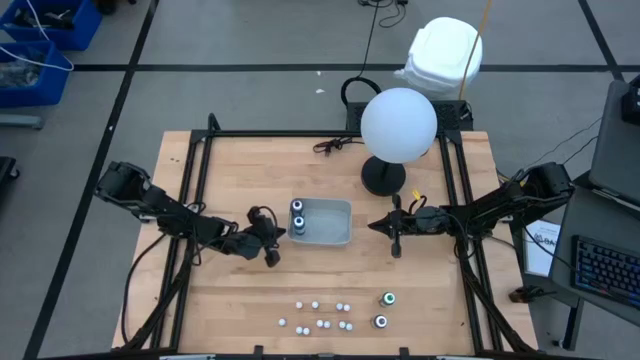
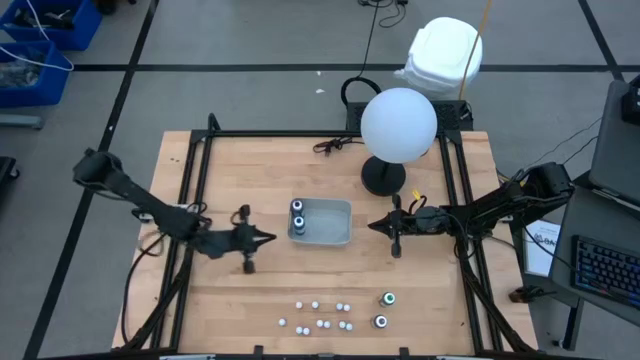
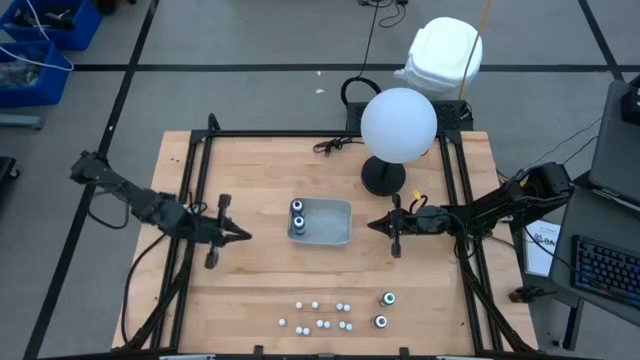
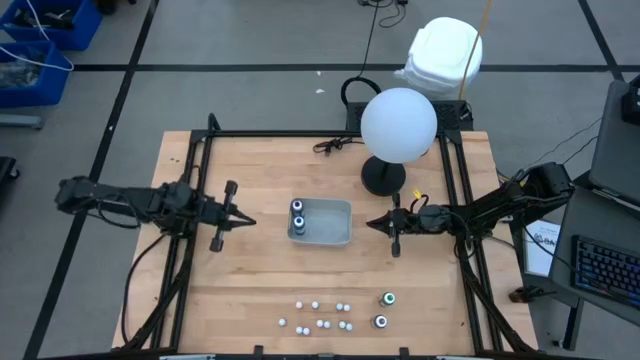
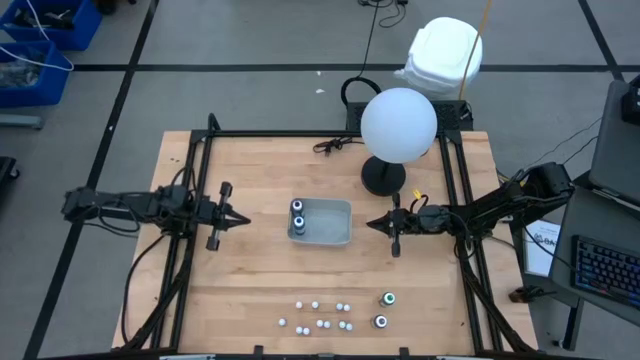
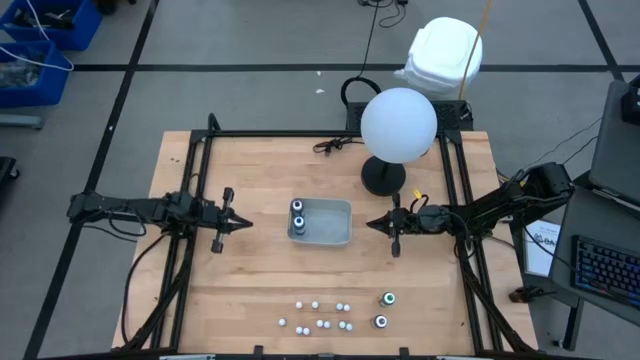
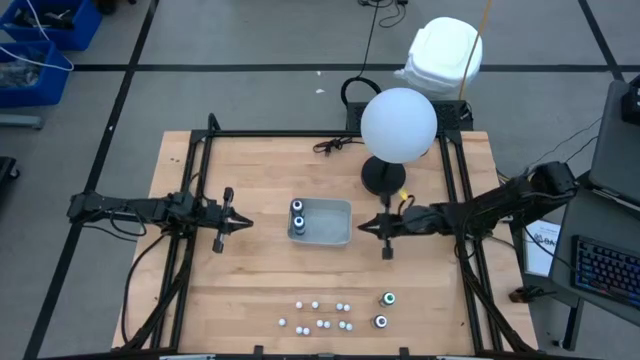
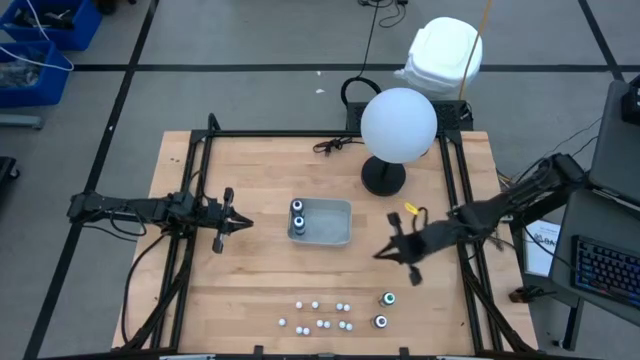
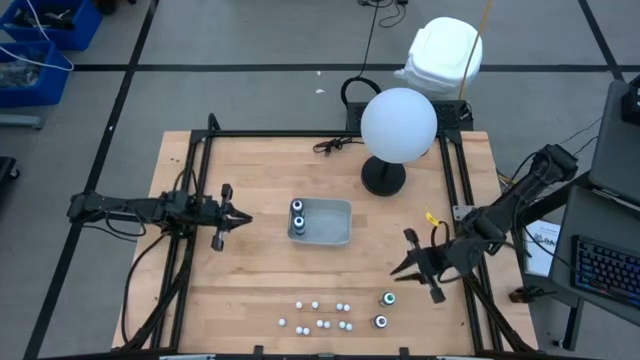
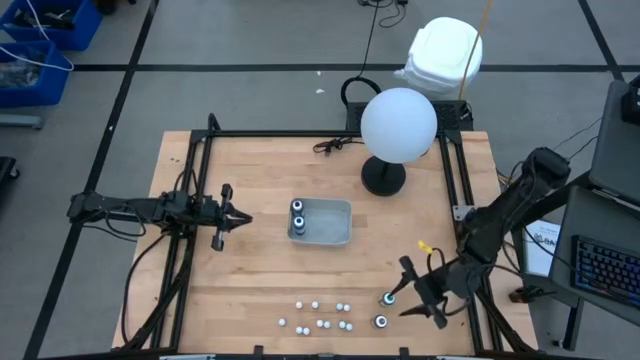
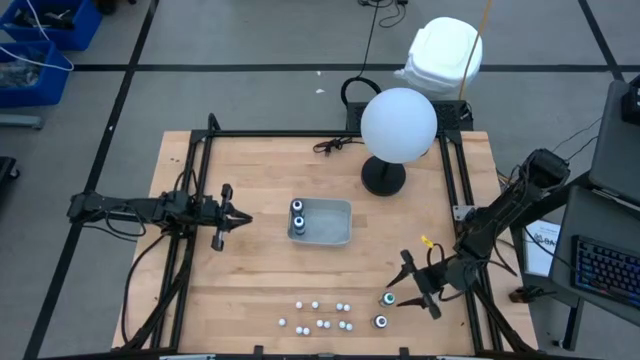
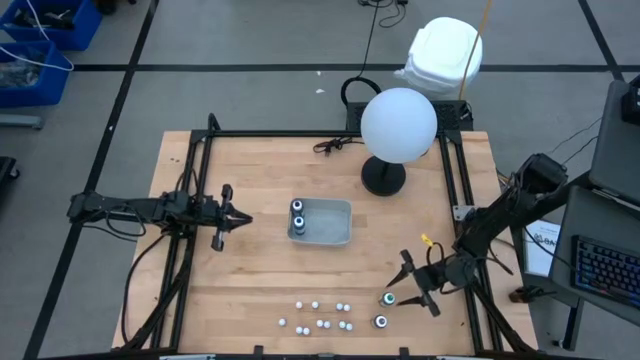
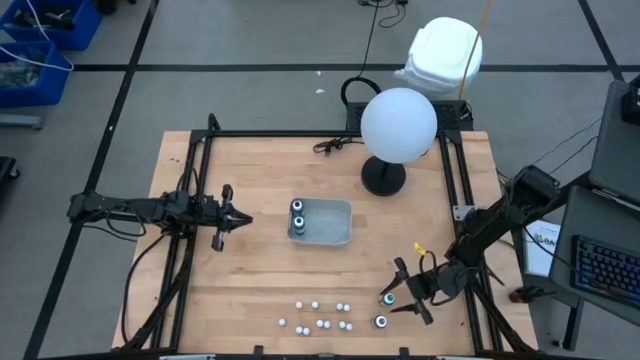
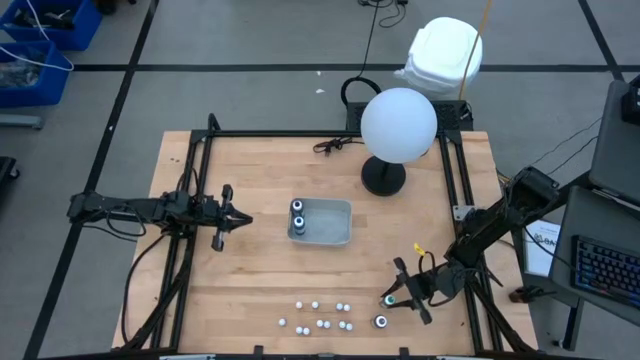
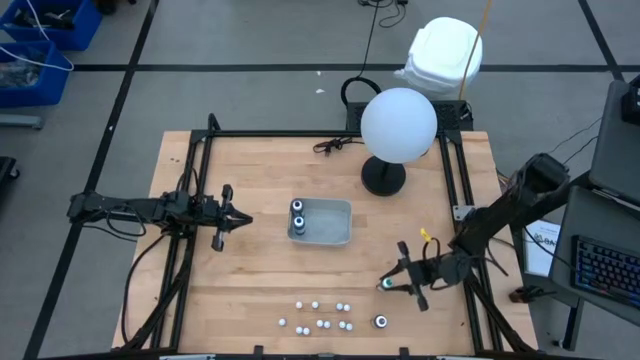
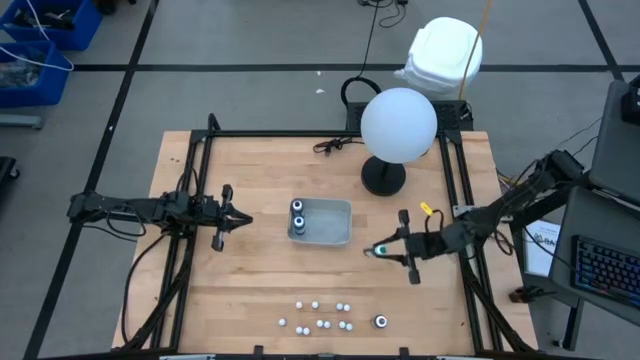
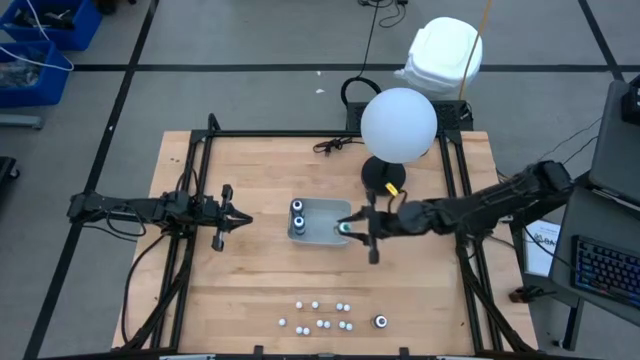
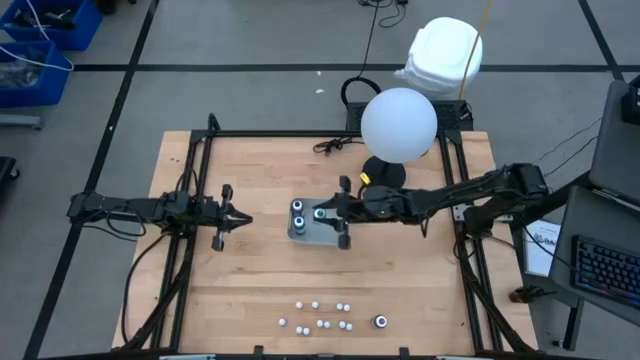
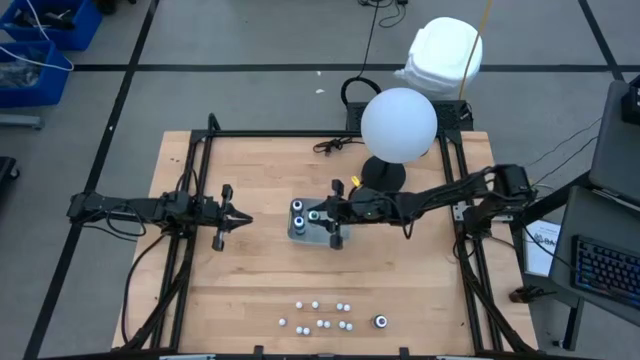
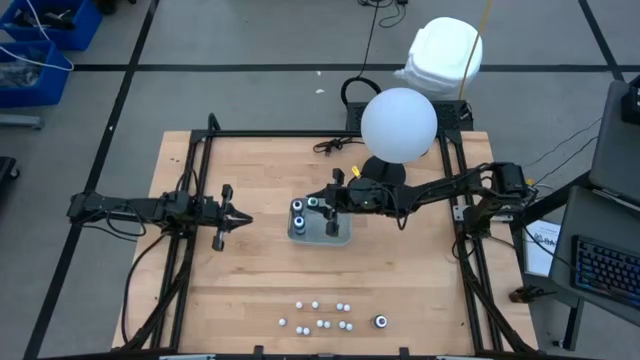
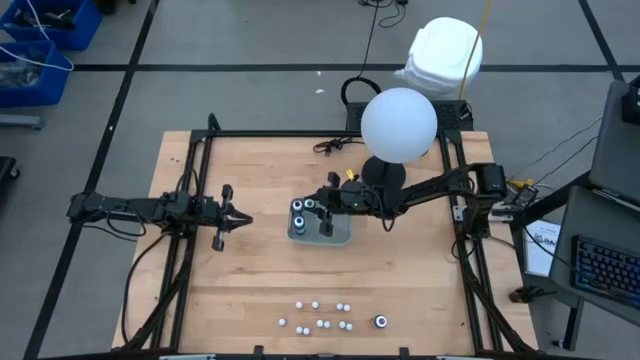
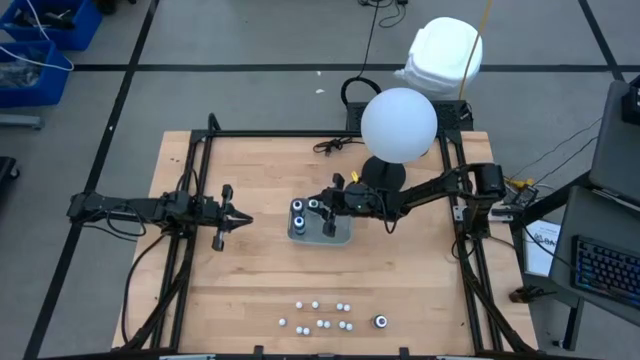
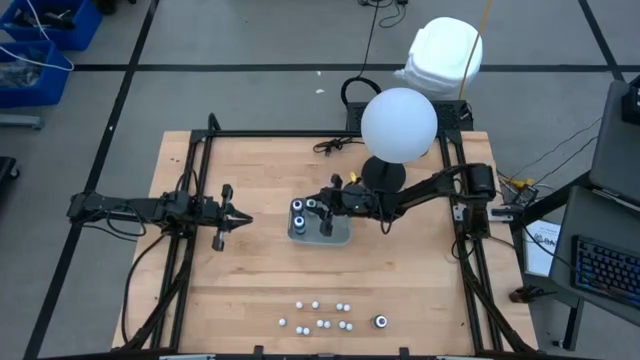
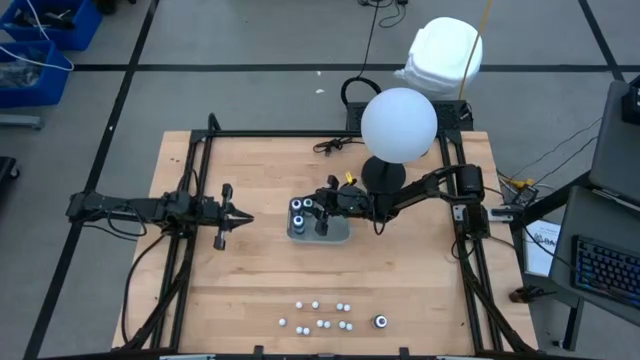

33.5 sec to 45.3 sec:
Task: Pick & Place food coloring
Put the big green food coloring bottle into the gray bin

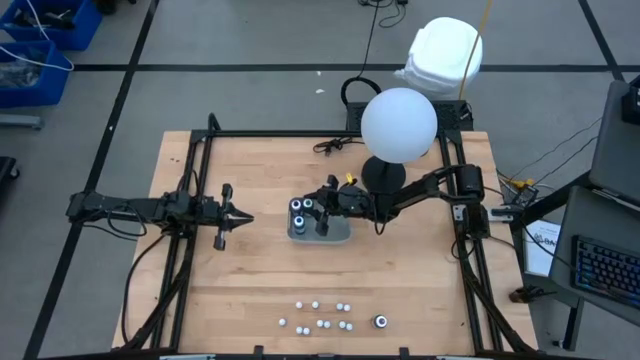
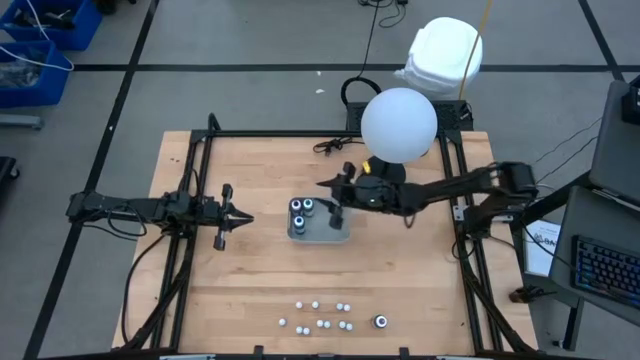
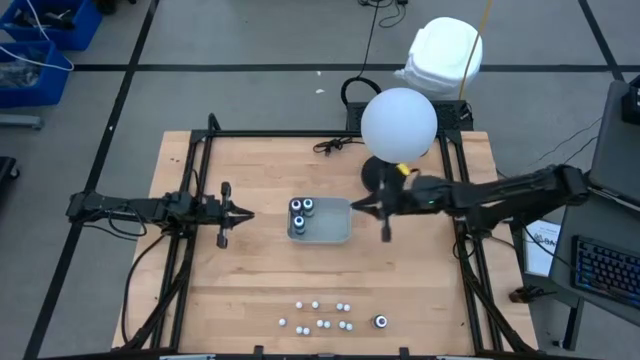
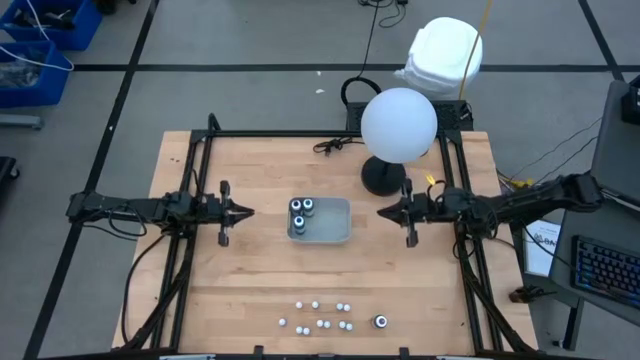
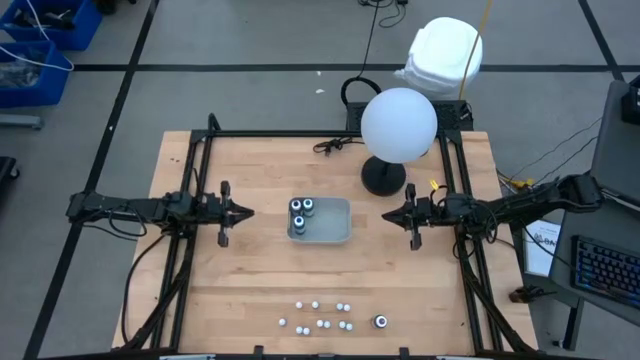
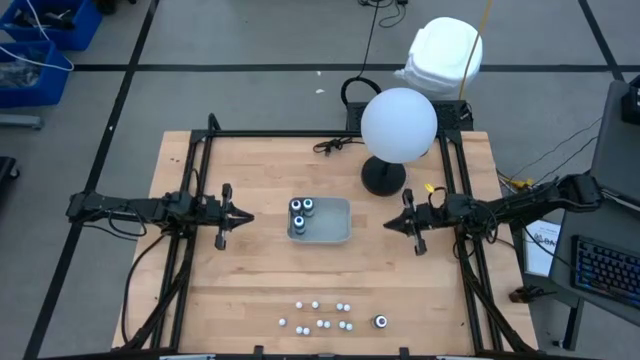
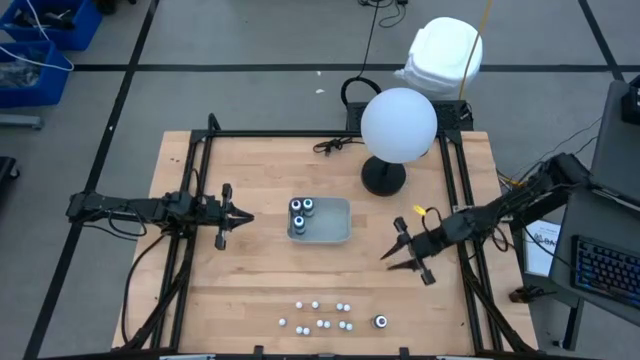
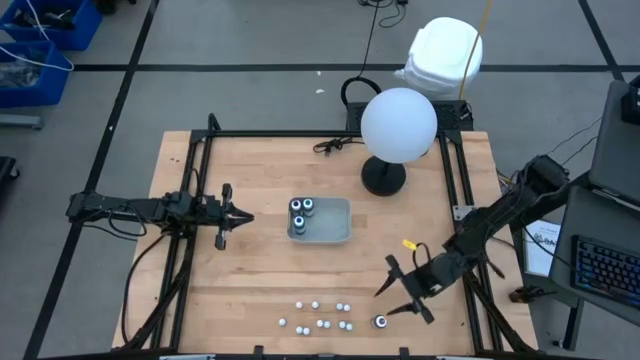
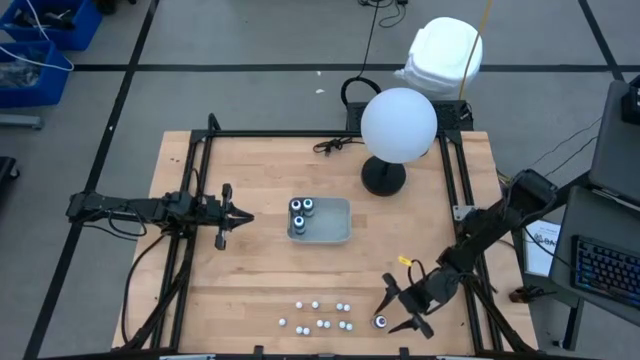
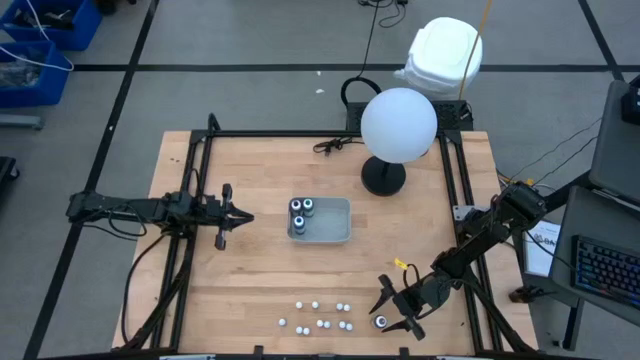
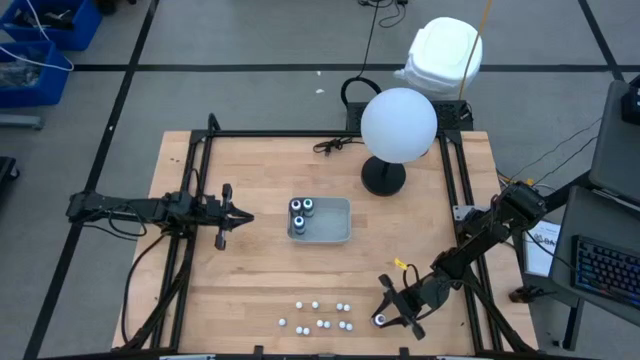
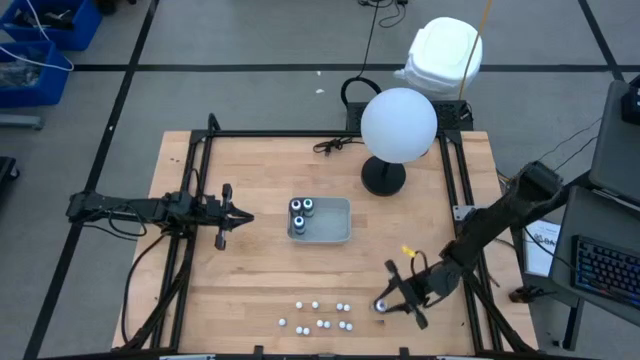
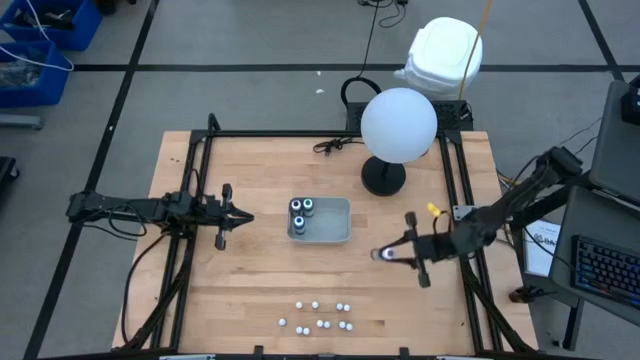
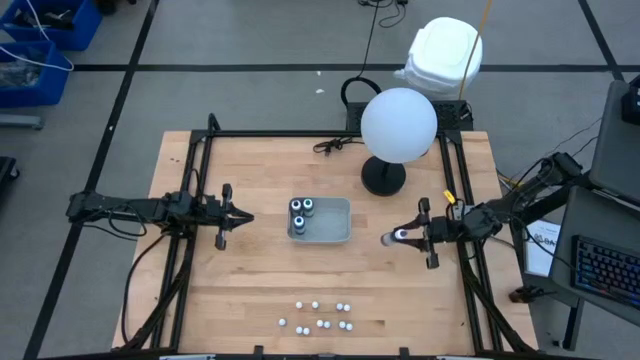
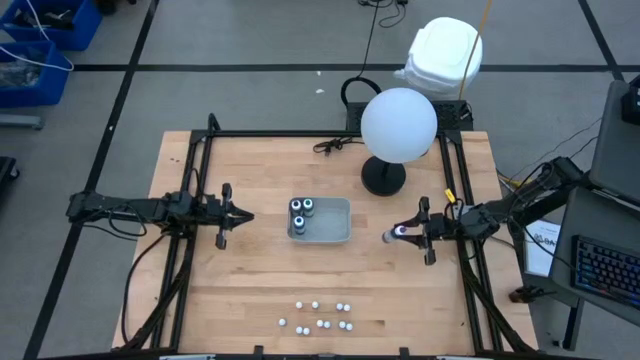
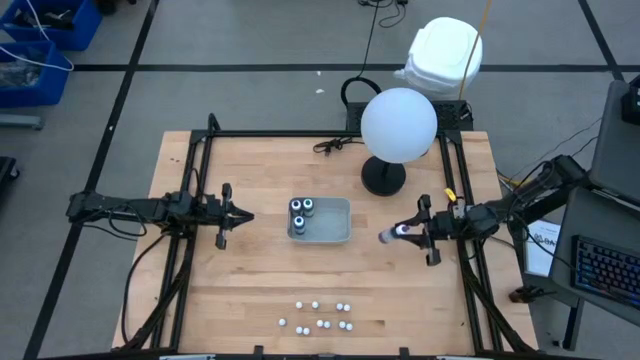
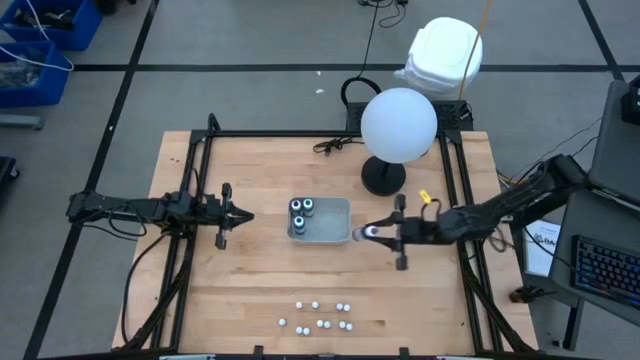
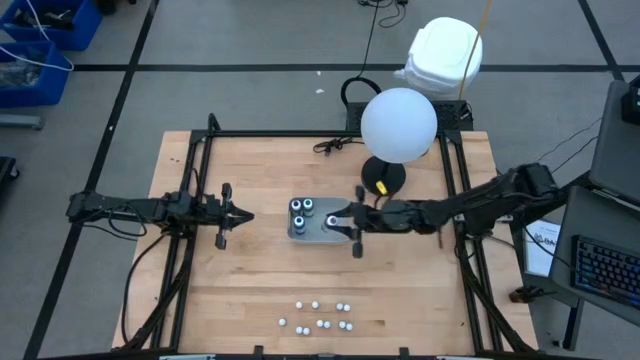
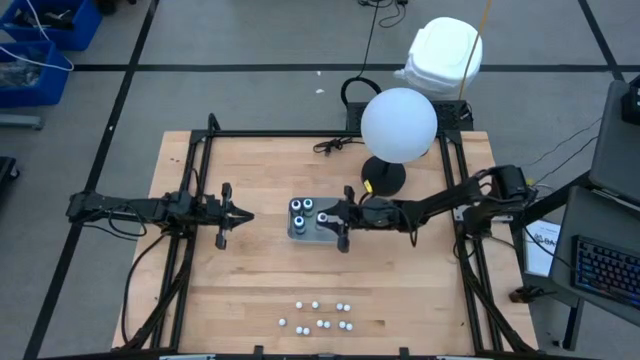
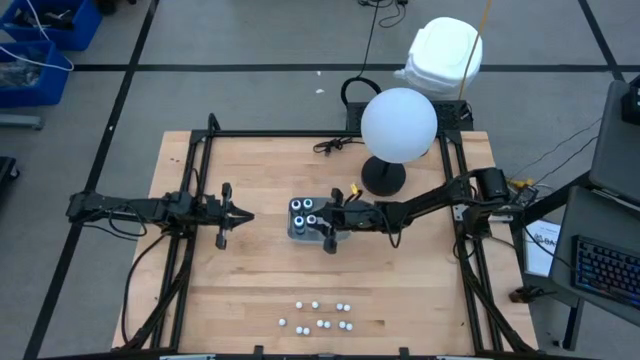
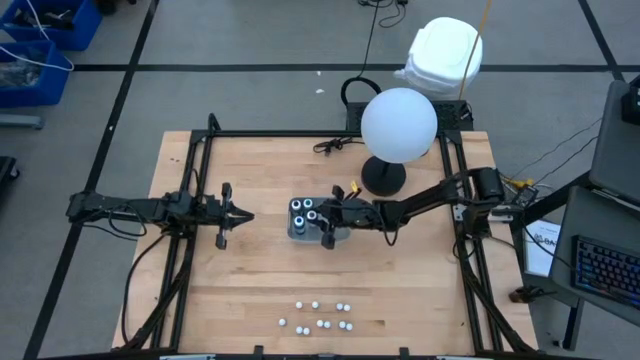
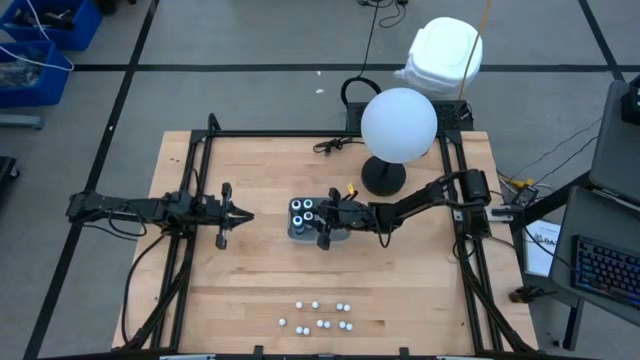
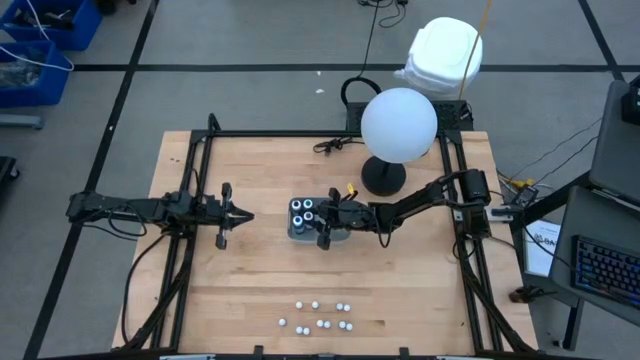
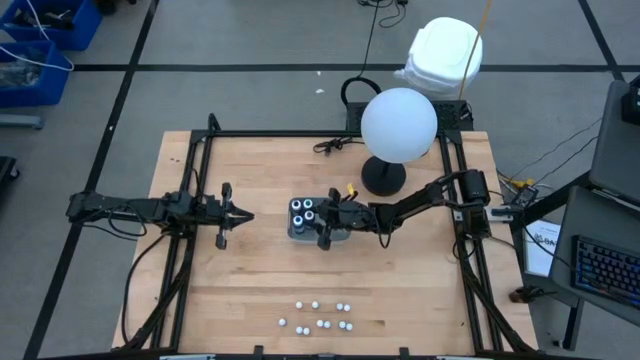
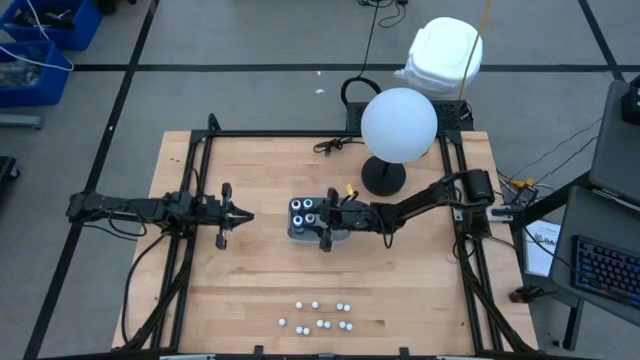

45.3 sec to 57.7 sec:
Put the big purple food coloring bottle into the gray bin
